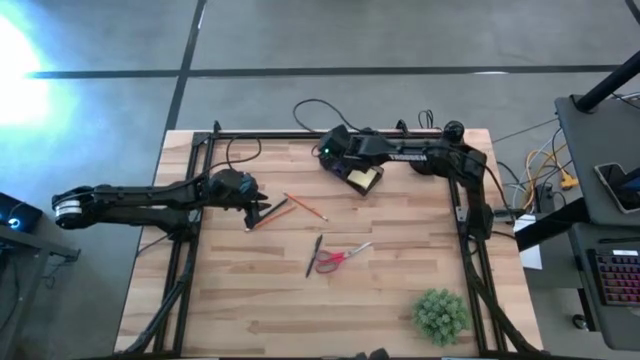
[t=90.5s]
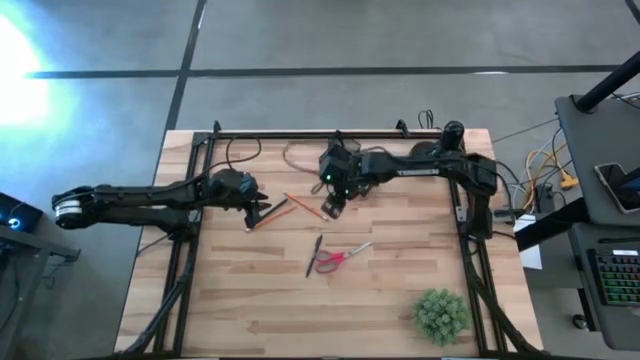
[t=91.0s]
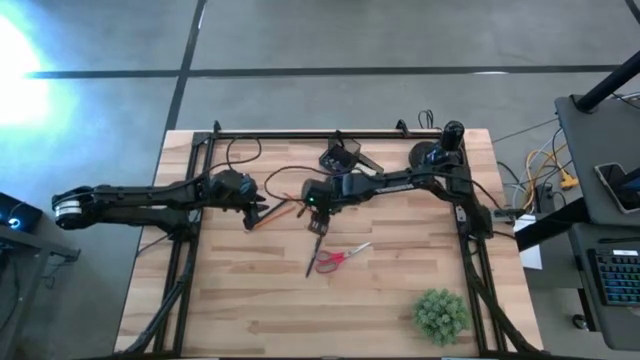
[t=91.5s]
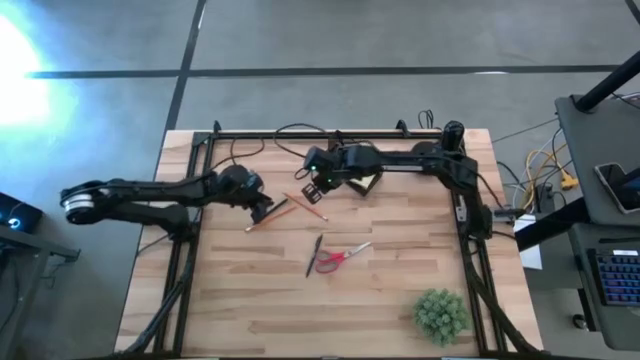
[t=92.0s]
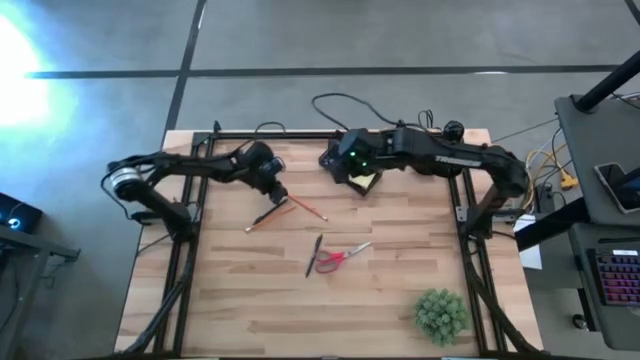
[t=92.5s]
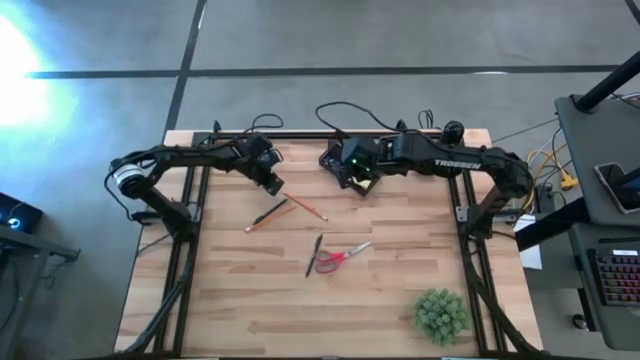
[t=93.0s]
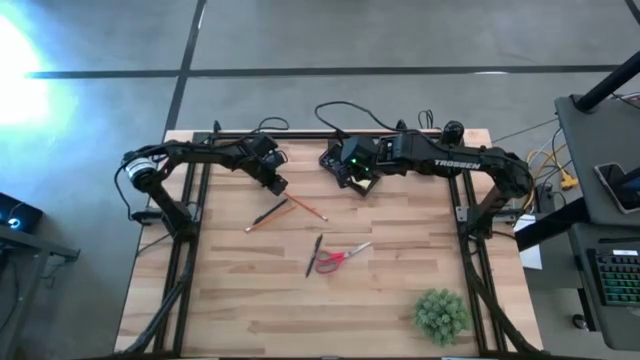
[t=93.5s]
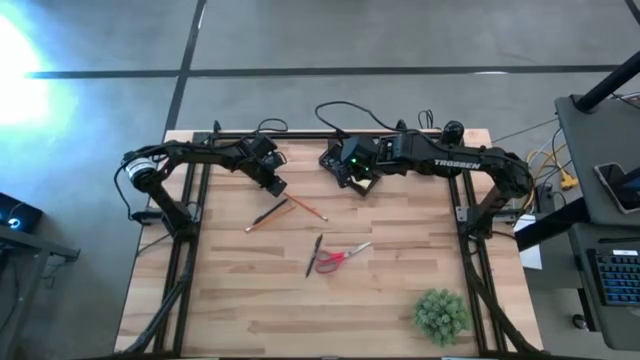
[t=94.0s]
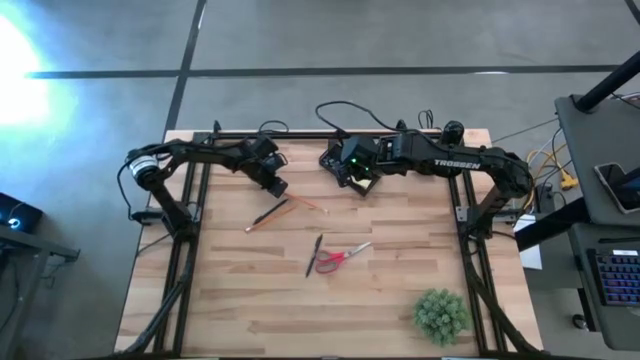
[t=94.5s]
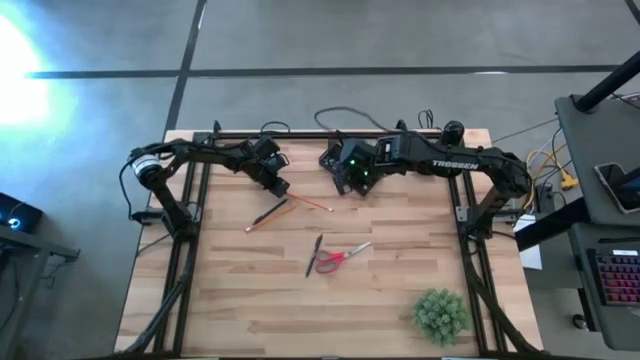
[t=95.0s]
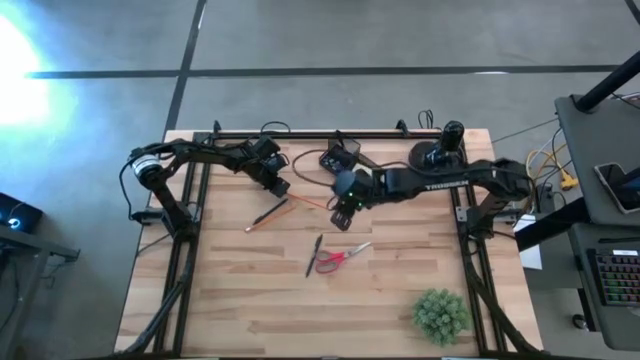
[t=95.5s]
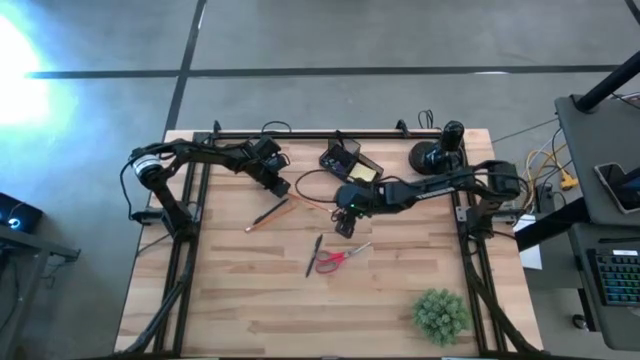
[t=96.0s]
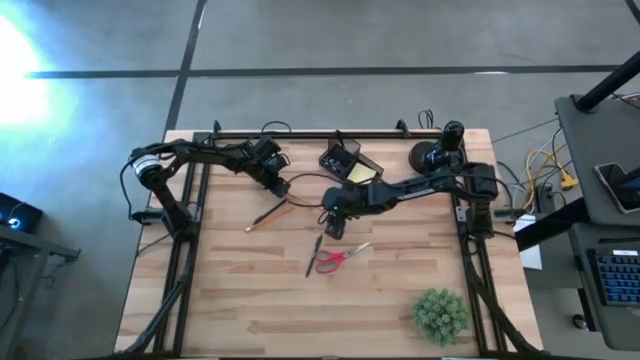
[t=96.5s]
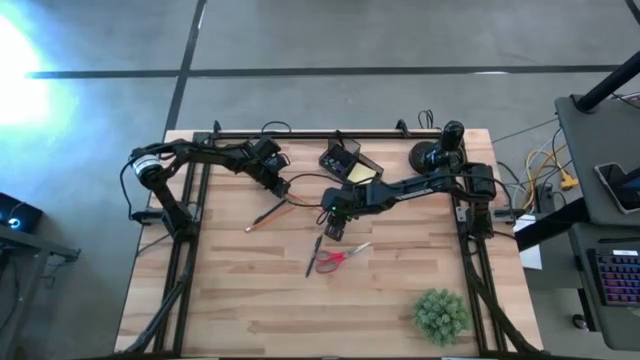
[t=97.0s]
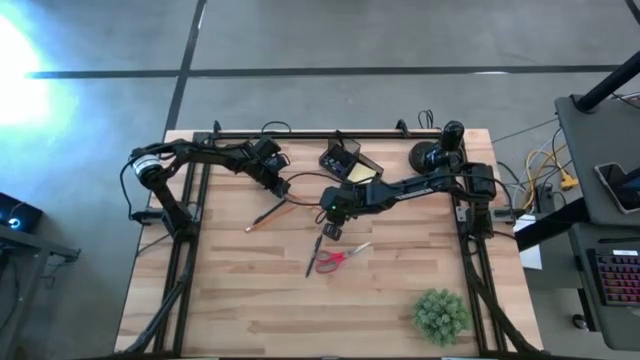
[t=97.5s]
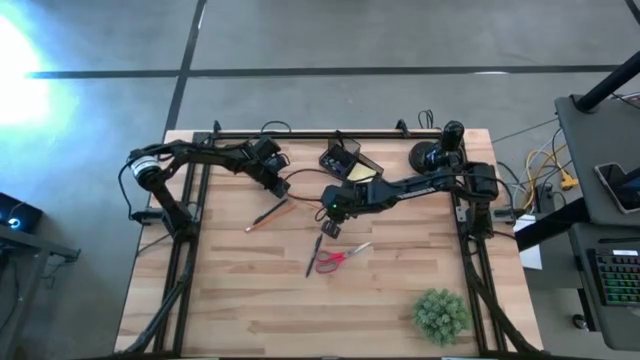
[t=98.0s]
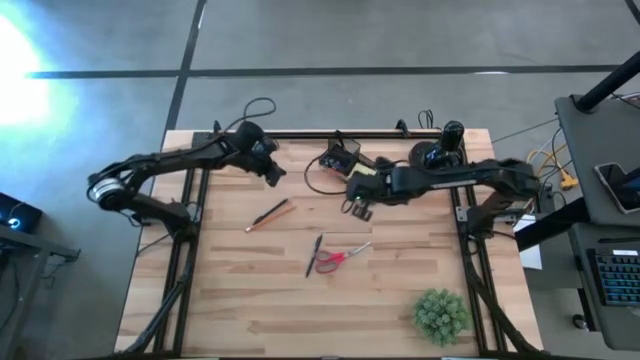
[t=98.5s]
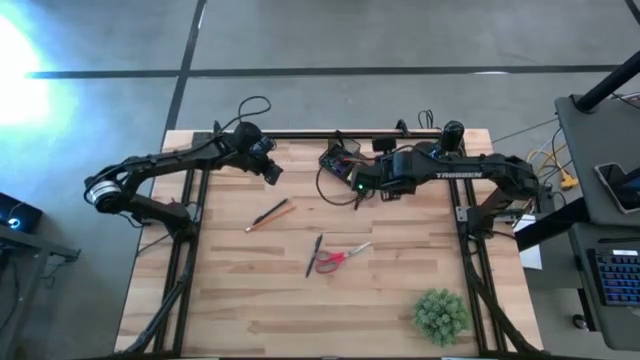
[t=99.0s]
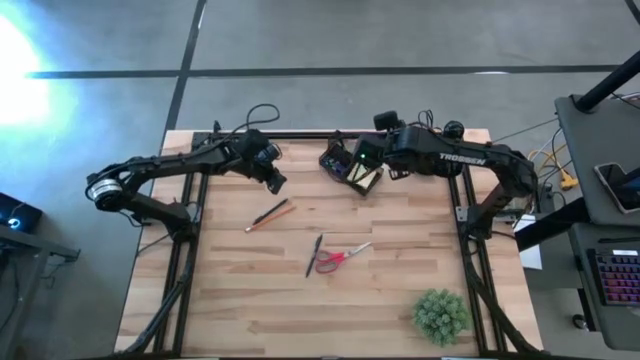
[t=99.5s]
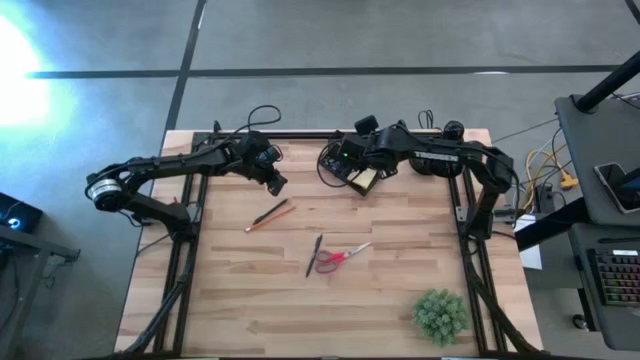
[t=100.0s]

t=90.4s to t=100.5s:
Task: Pick and place office supplies into organizer
Put the right pencil into the desk organizer

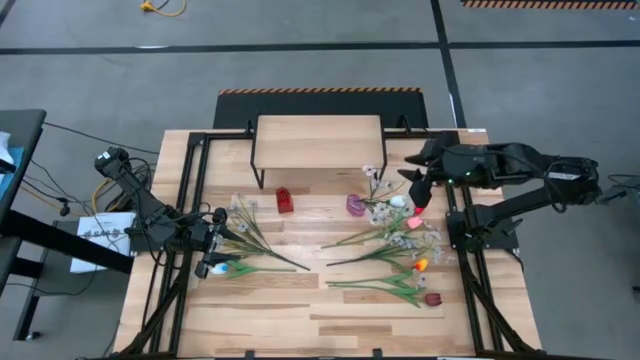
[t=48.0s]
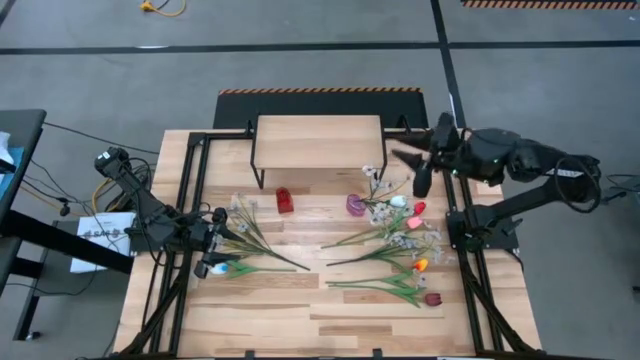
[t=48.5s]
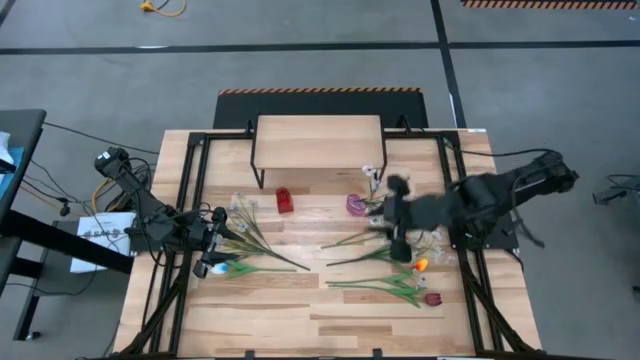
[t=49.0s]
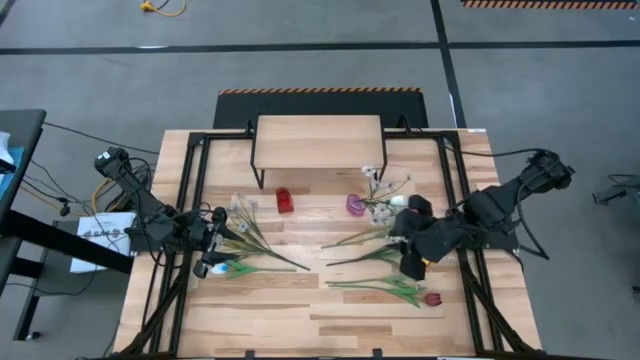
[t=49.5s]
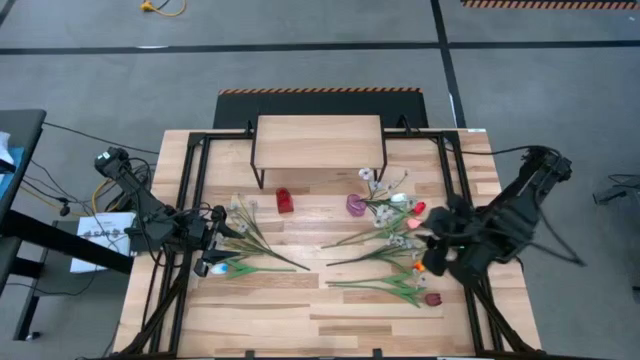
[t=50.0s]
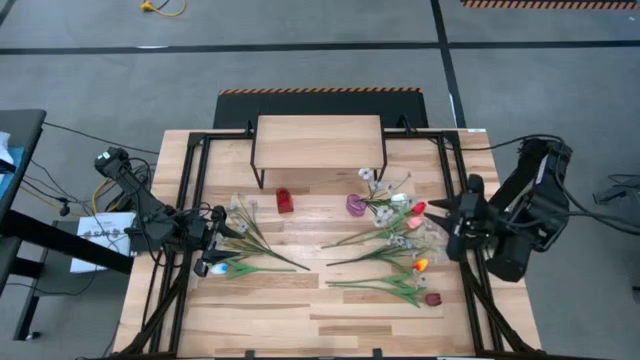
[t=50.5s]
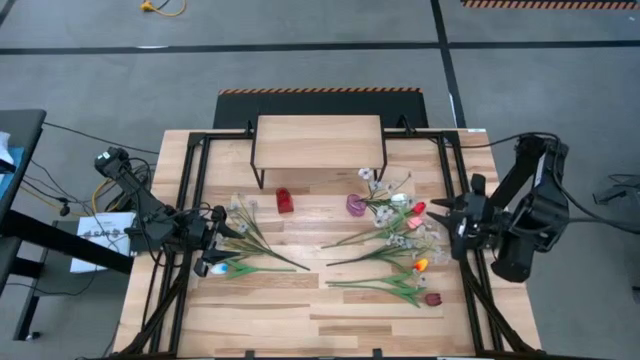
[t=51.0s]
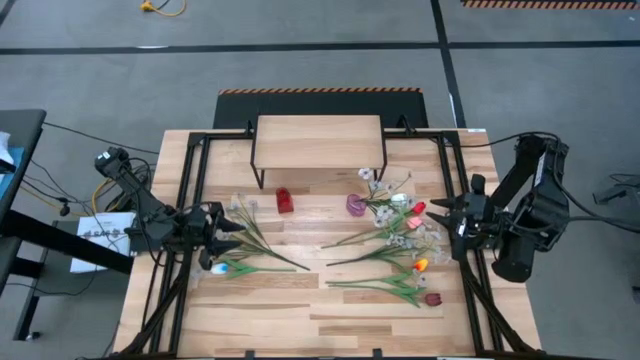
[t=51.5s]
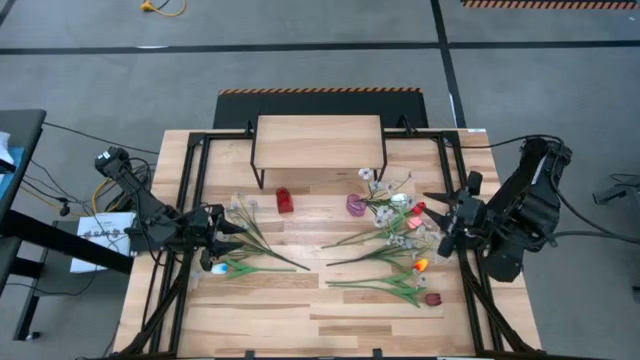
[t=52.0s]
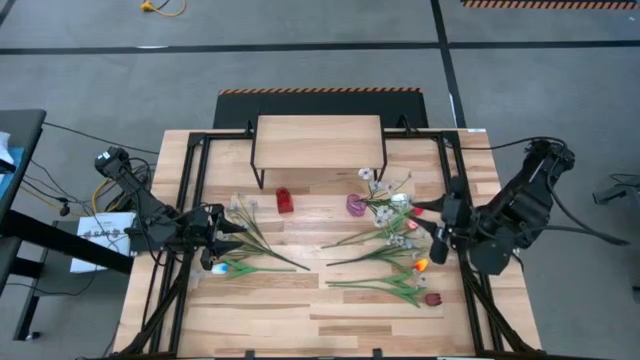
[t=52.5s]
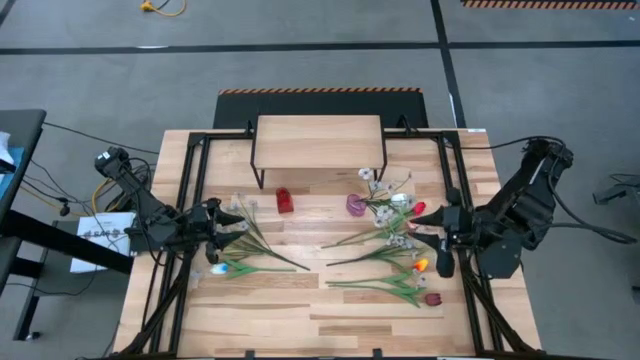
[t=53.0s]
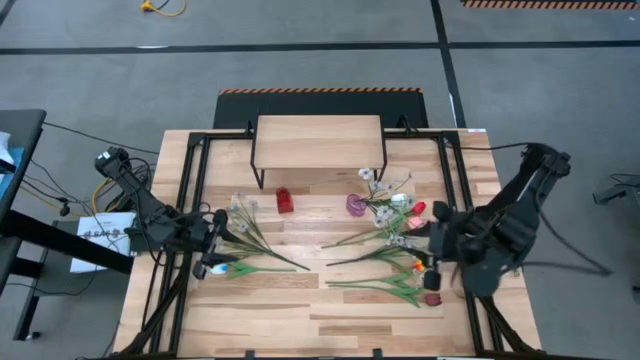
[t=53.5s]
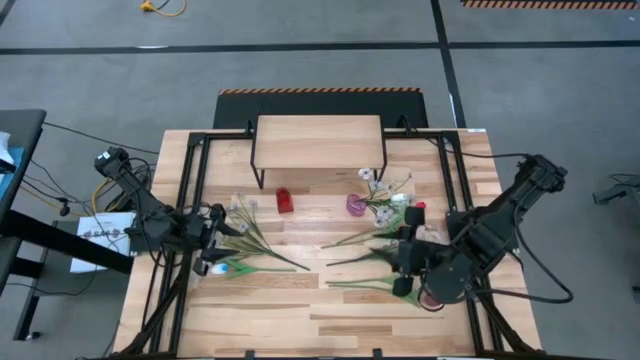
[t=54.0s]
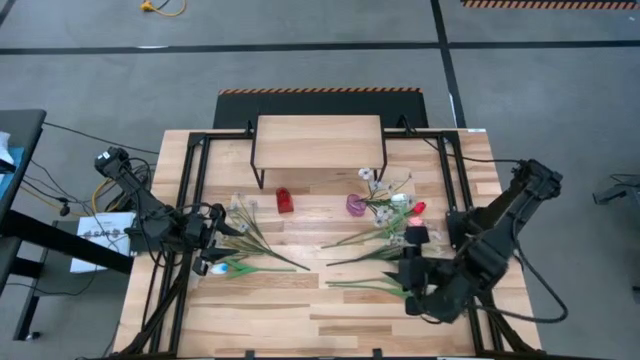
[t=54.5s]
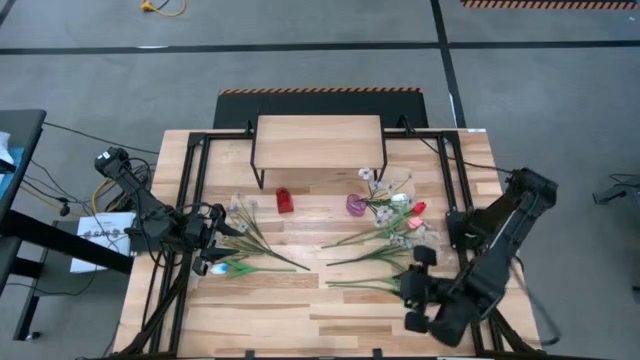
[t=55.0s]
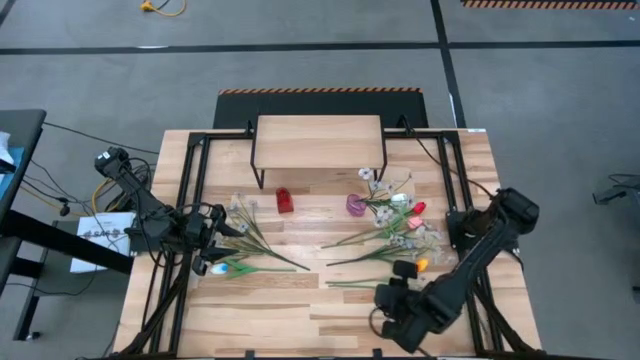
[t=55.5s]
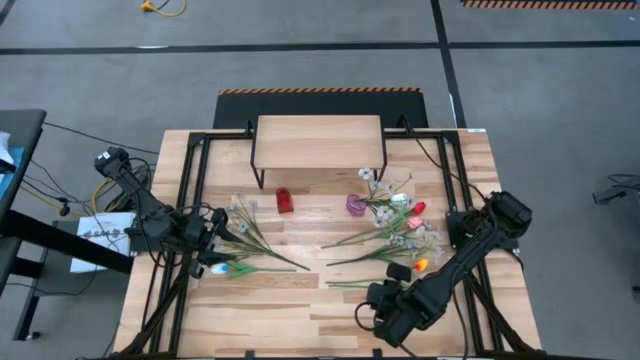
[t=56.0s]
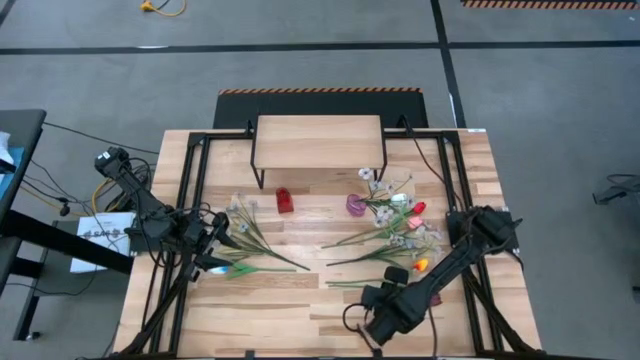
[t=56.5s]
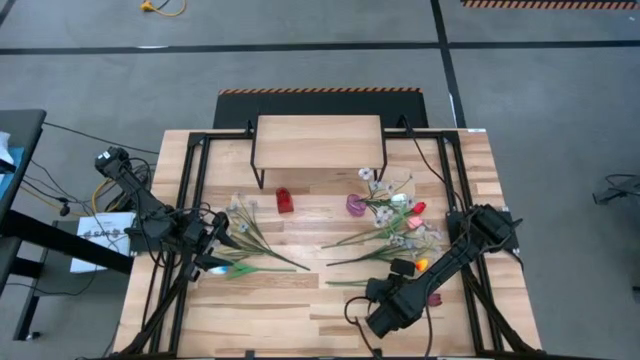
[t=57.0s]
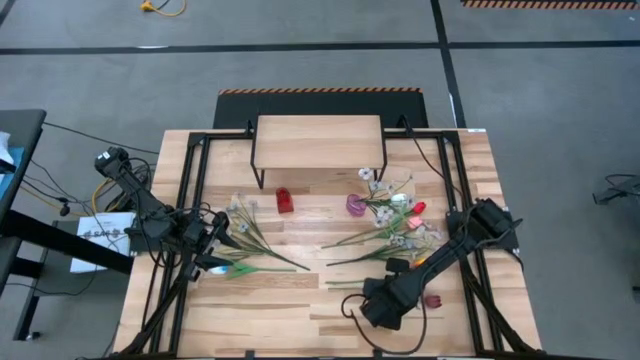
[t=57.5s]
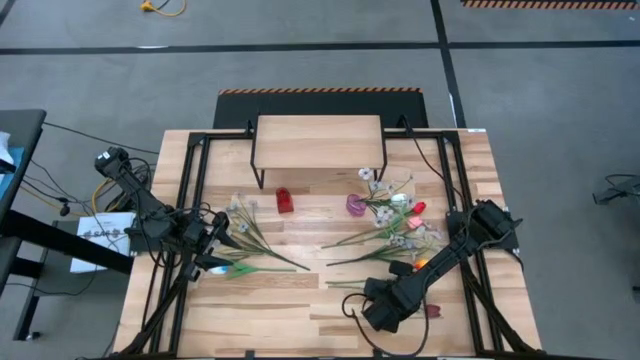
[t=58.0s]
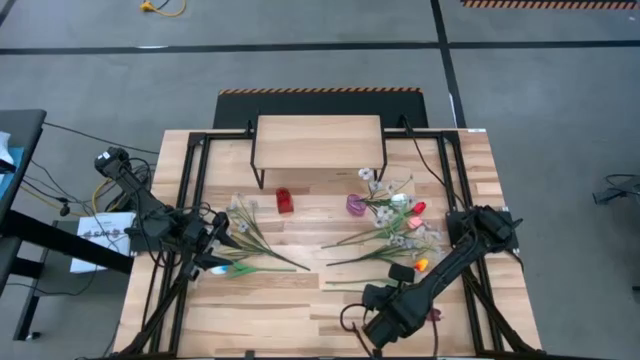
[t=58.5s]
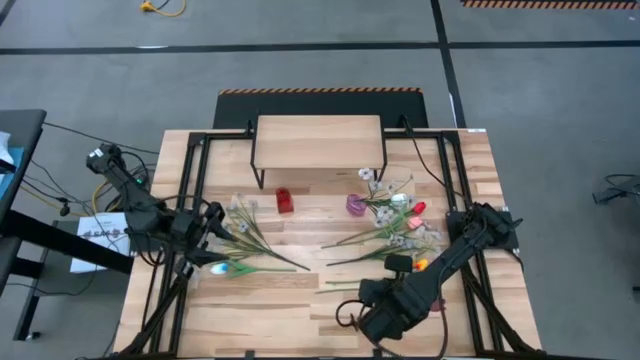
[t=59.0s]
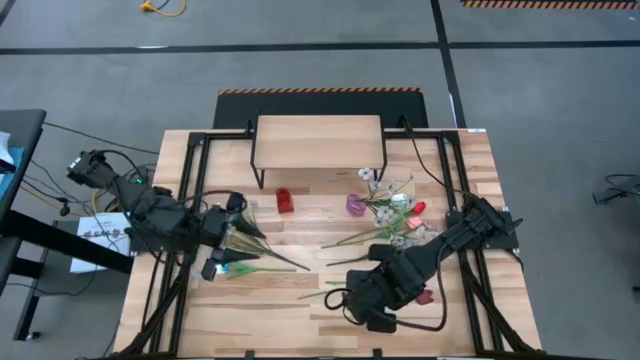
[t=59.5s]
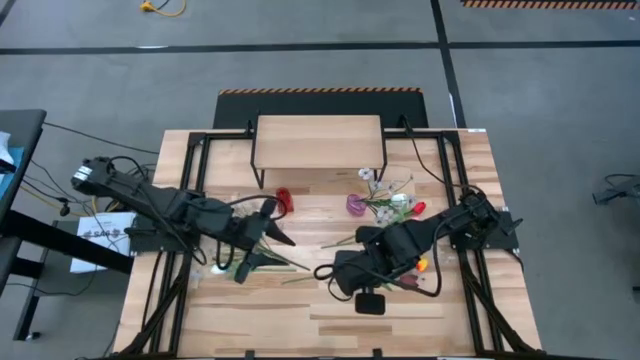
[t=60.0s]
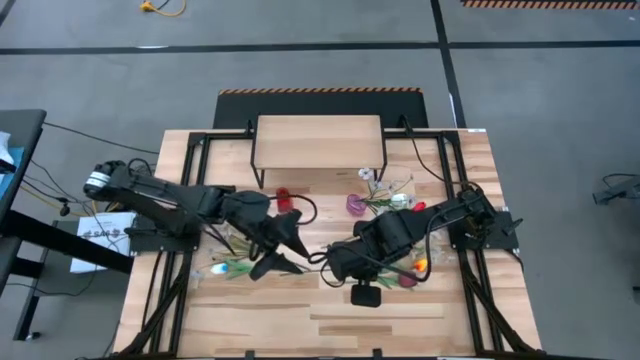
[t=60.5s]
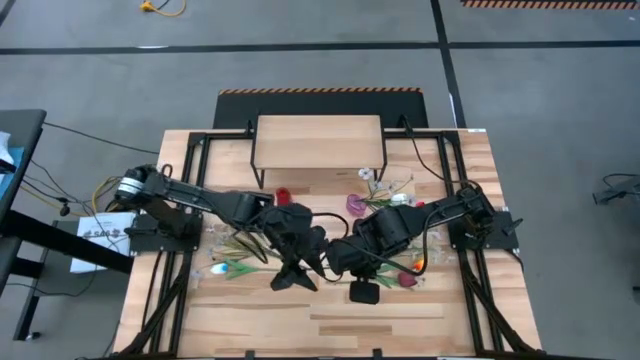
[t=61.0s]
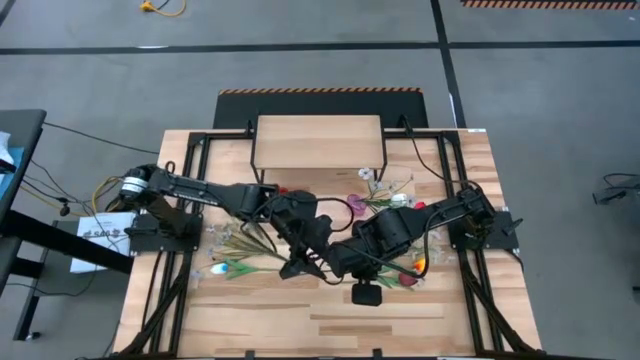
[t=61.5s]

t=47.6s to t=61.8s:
Task: Pick and place flowers into a vace then onto a shelf
Put the dark red tulip into the red vase
